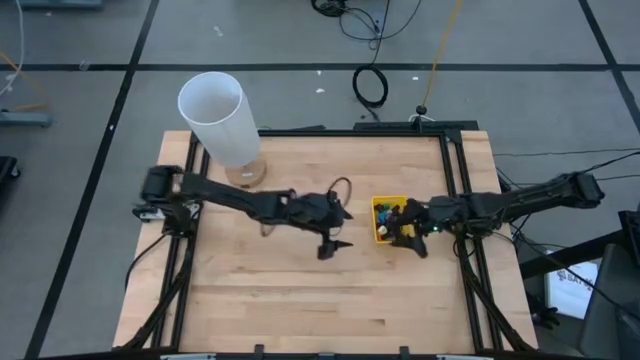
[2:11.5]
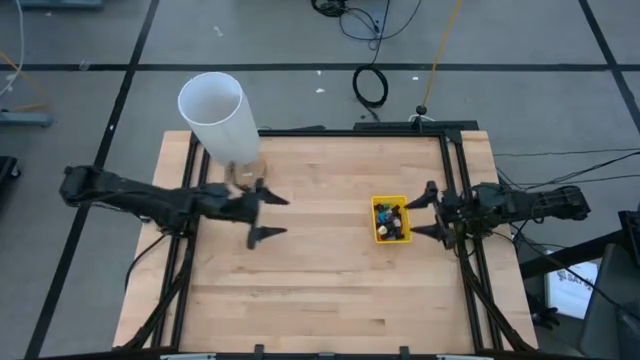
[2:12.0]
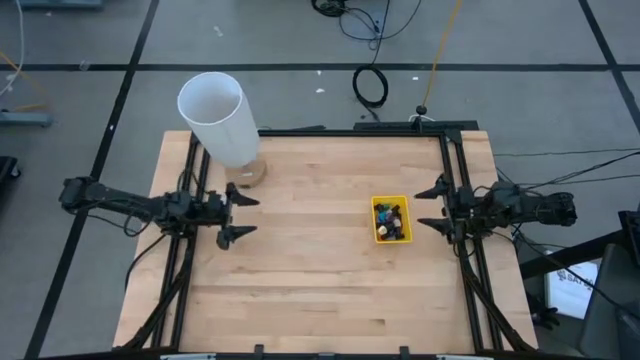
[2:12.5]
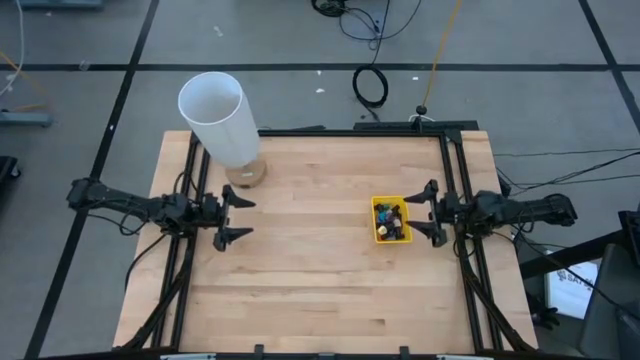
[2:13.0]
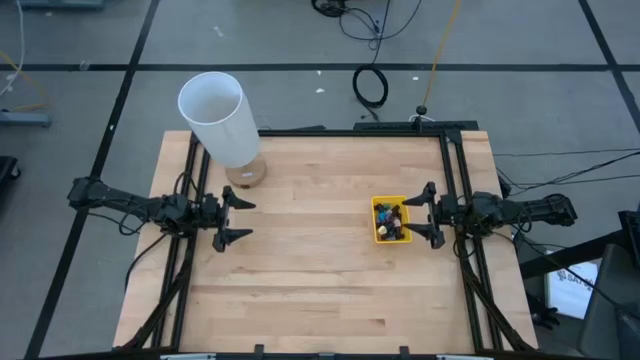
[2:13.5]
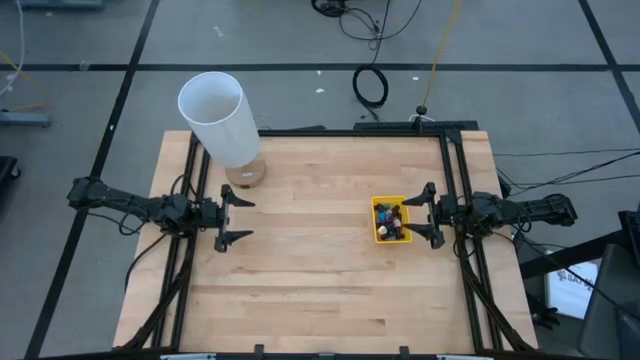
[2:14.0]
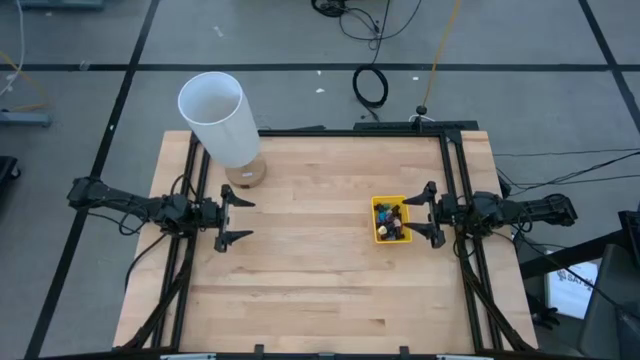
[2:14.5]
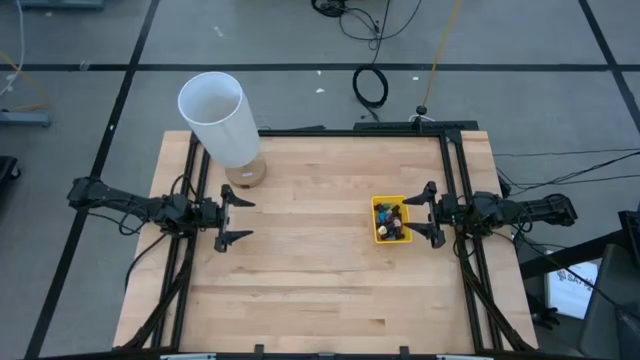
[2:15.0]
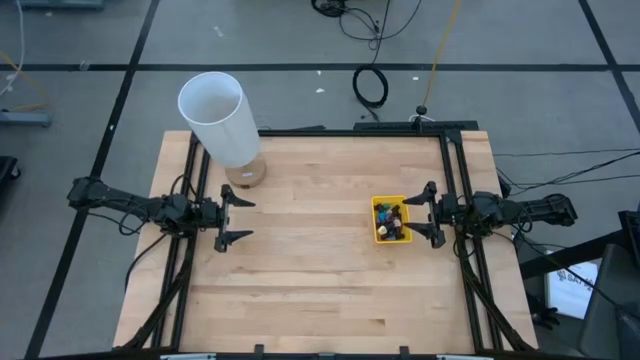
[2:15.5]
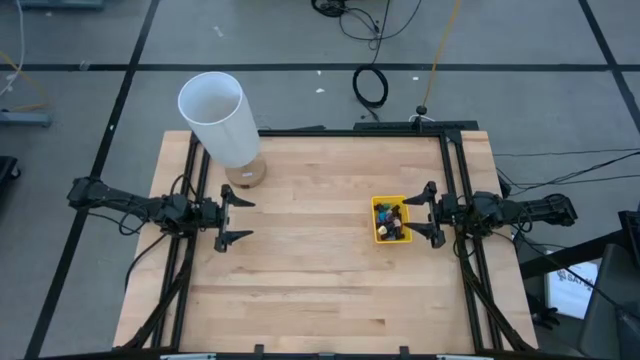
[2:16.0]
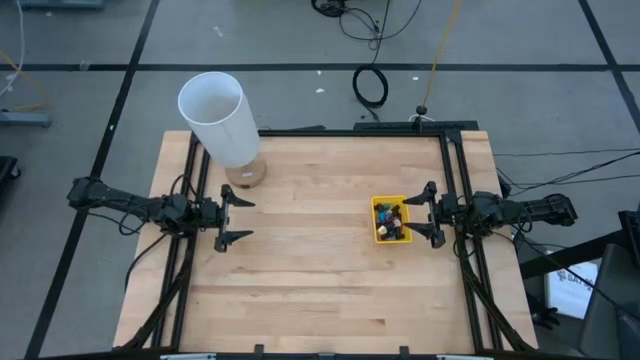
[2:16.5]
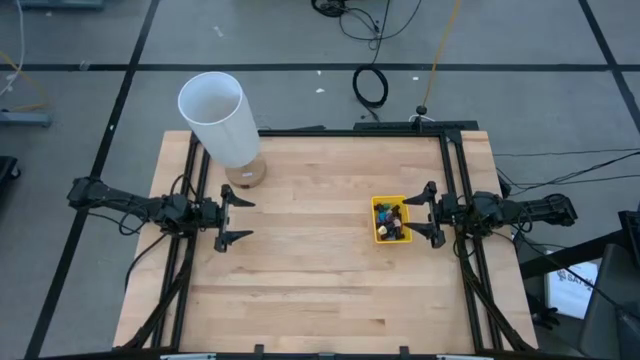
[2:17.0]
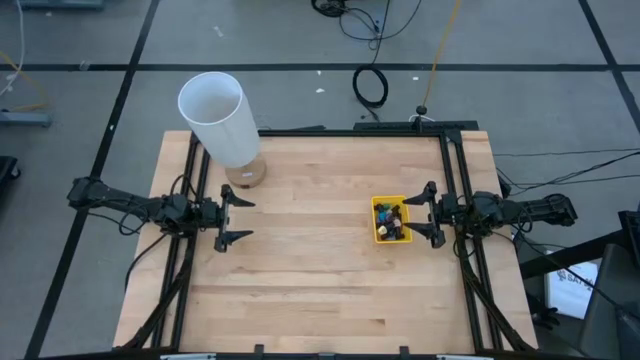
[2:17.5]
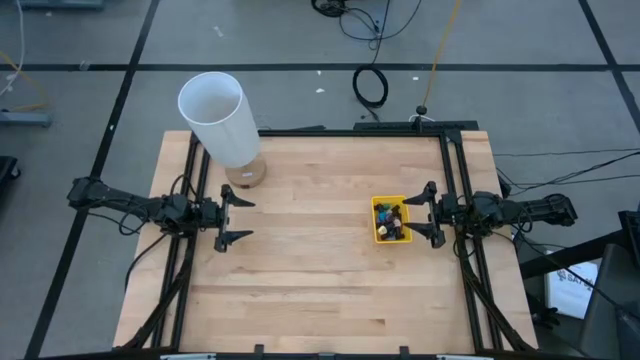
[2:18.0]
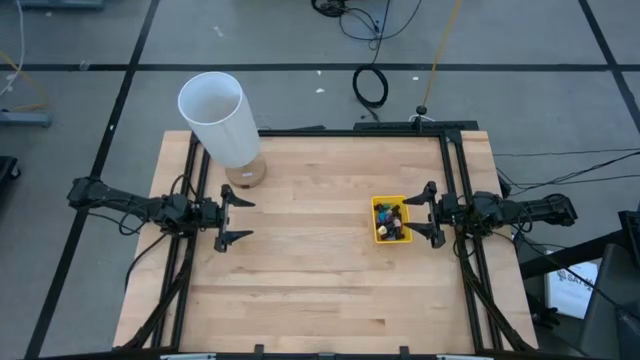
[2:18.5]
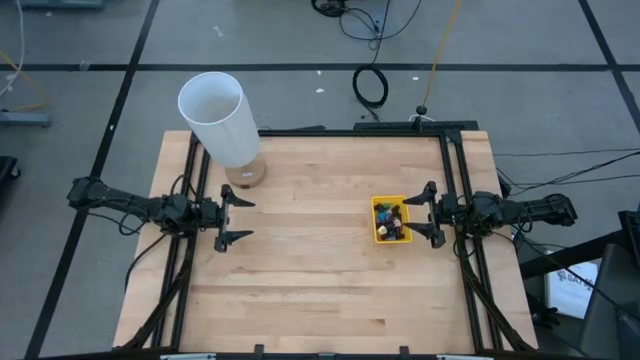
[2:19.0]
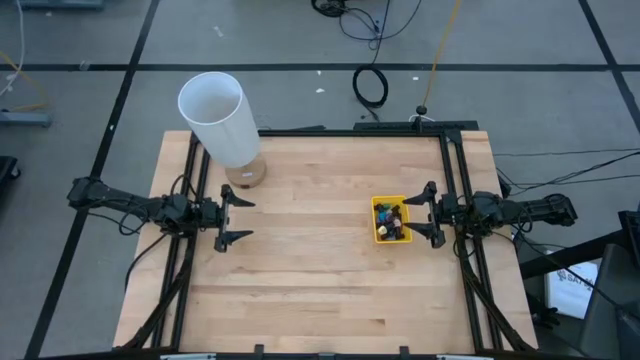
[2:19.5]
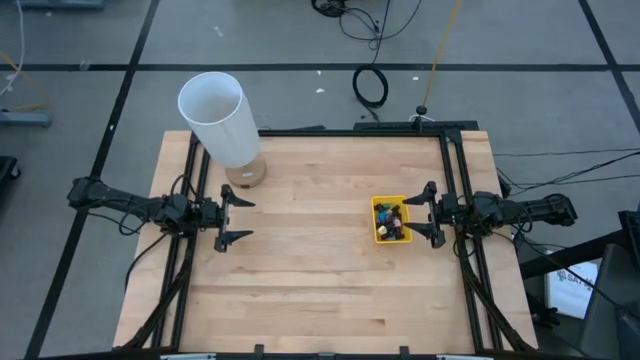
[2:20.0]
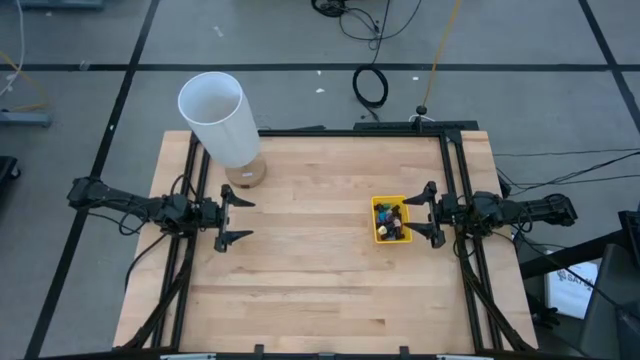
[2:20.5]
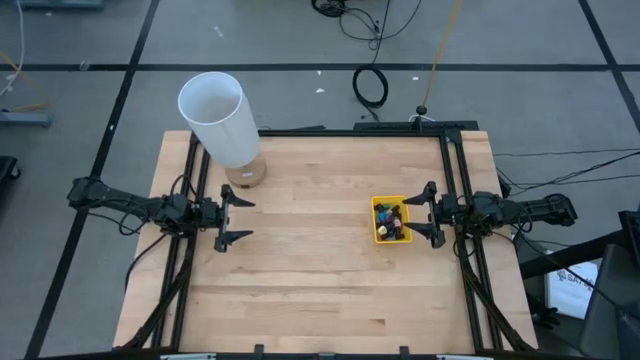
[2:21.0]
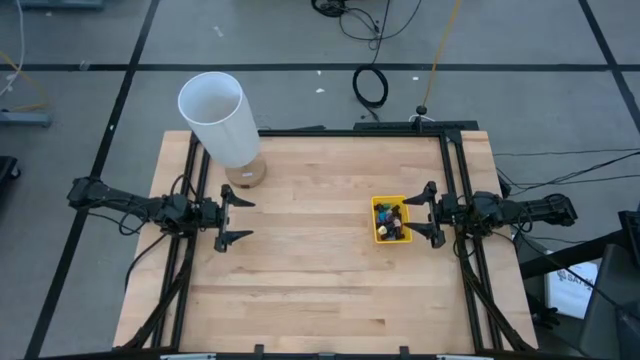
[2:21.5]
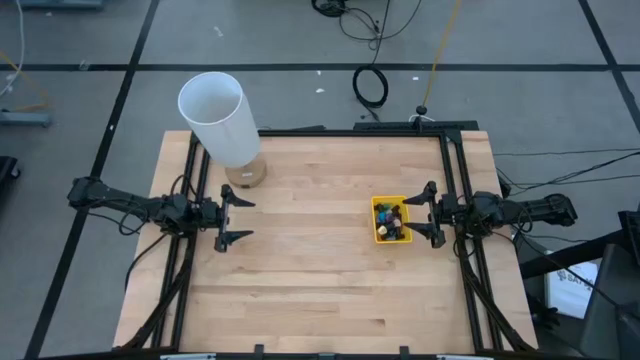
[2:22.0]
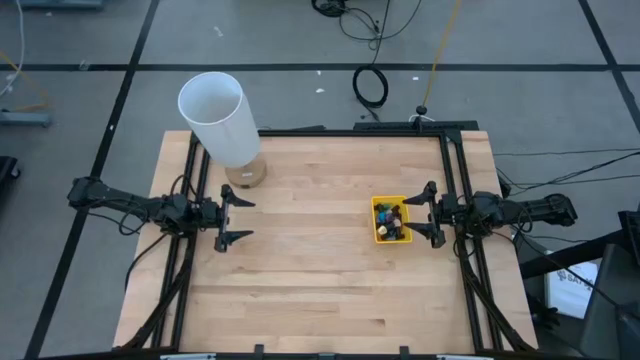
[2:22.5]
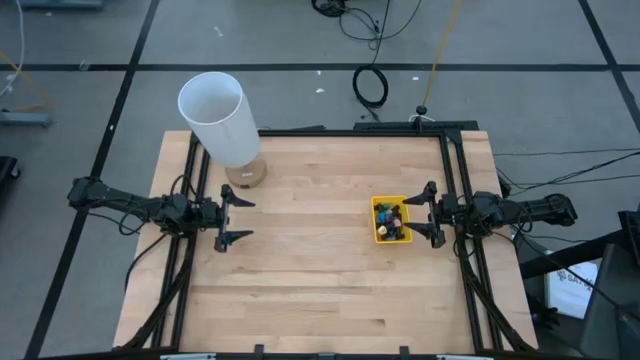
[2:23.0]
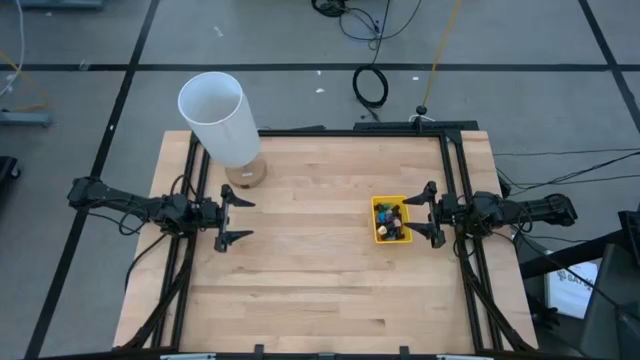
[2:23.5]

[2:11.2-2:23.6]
Task: Pick & Place Nail Polish
Return to Home Position

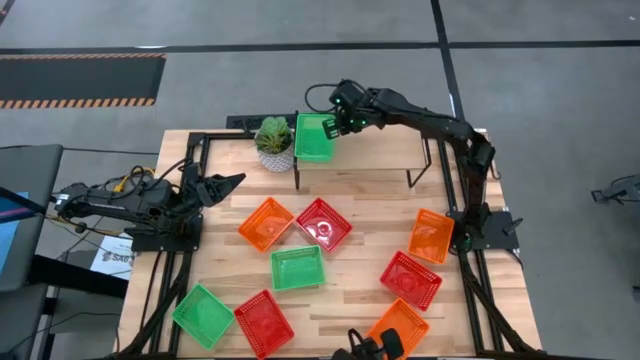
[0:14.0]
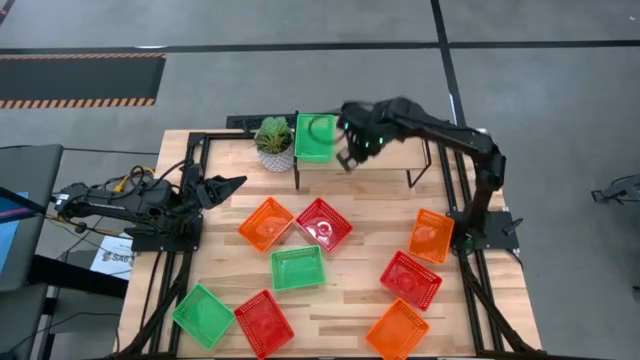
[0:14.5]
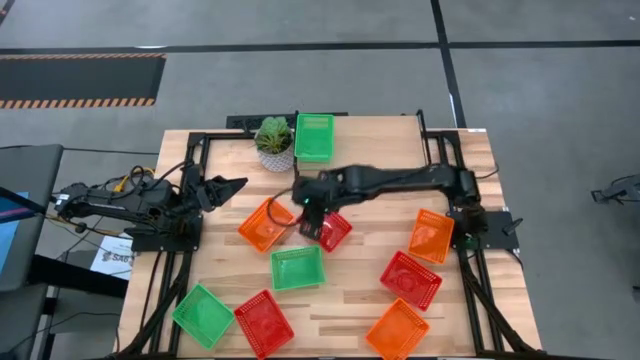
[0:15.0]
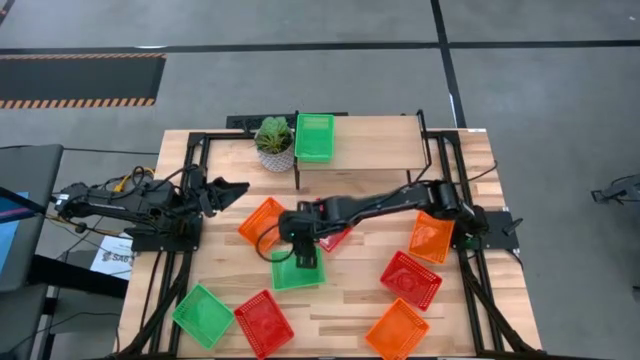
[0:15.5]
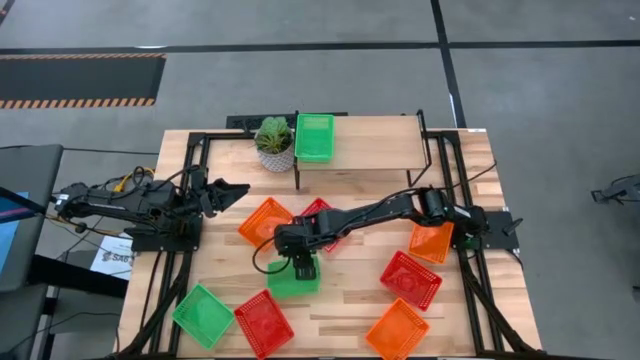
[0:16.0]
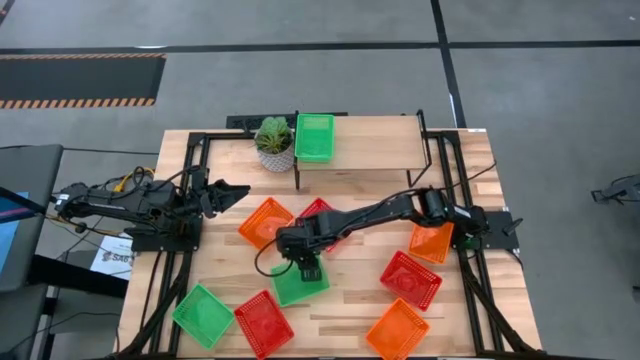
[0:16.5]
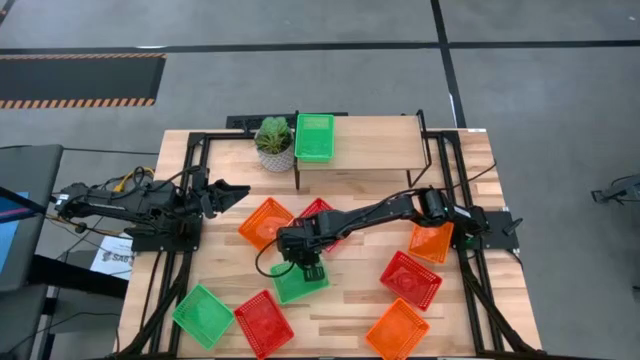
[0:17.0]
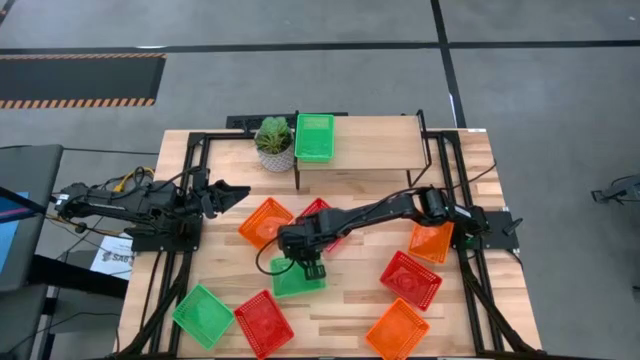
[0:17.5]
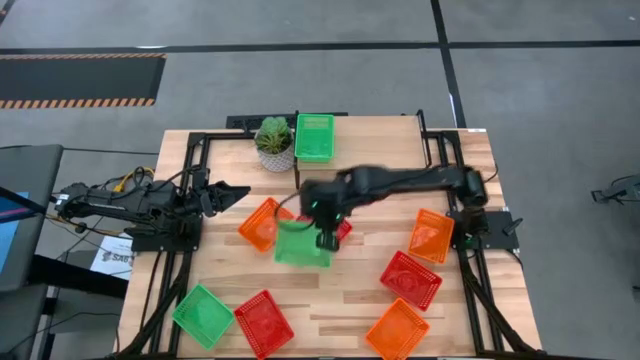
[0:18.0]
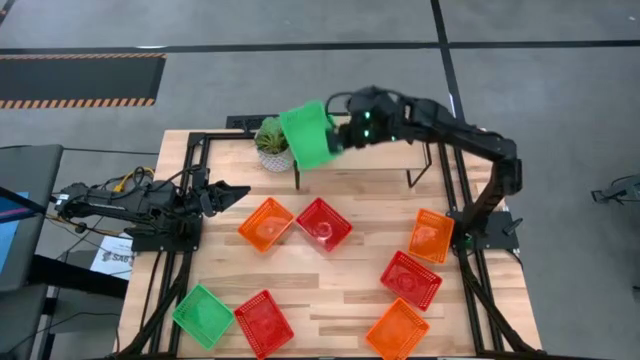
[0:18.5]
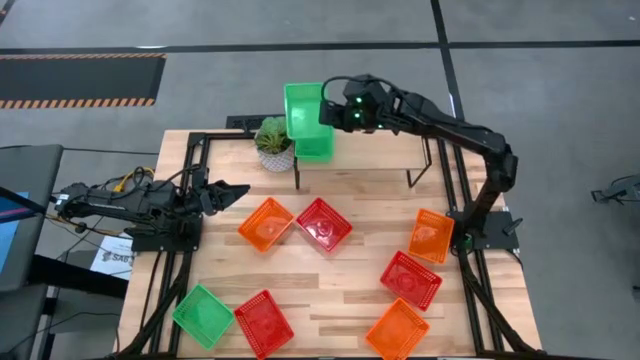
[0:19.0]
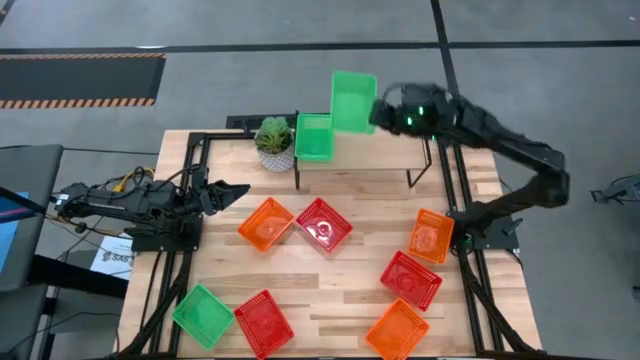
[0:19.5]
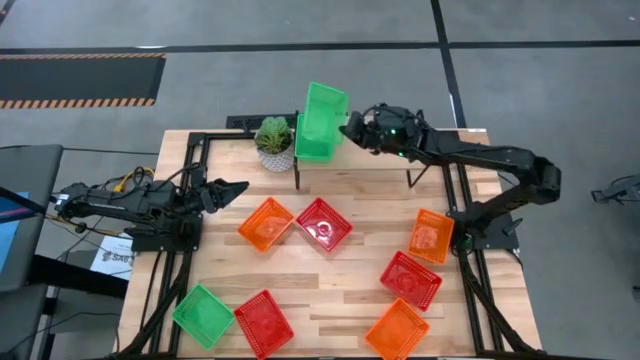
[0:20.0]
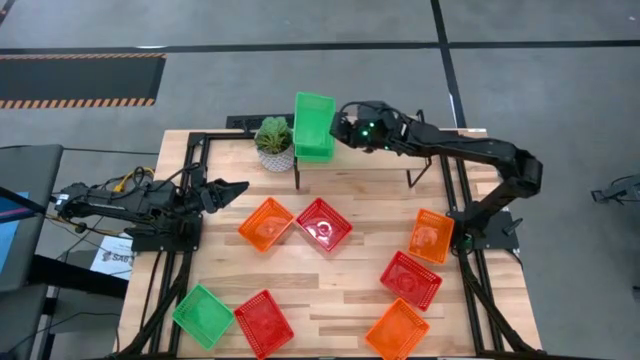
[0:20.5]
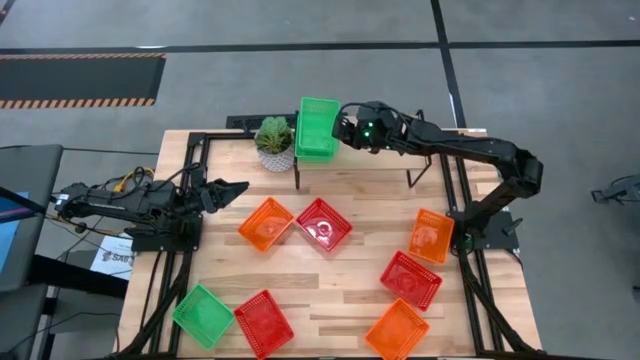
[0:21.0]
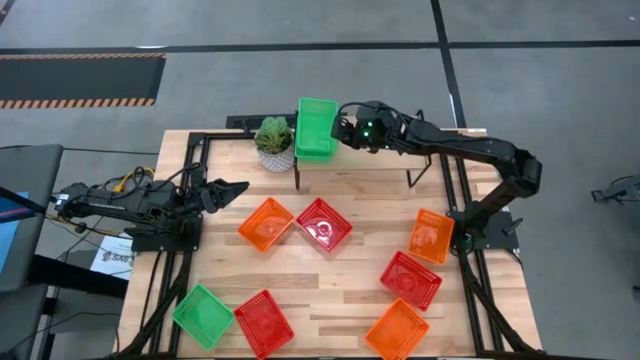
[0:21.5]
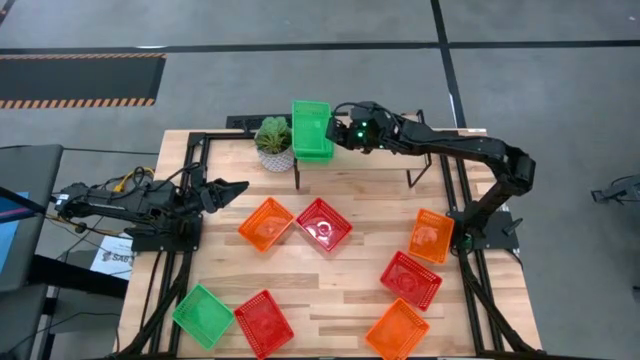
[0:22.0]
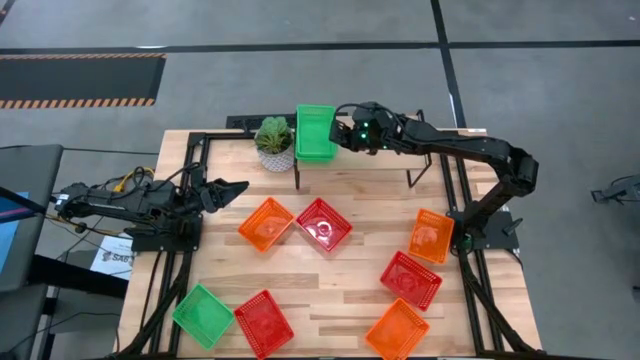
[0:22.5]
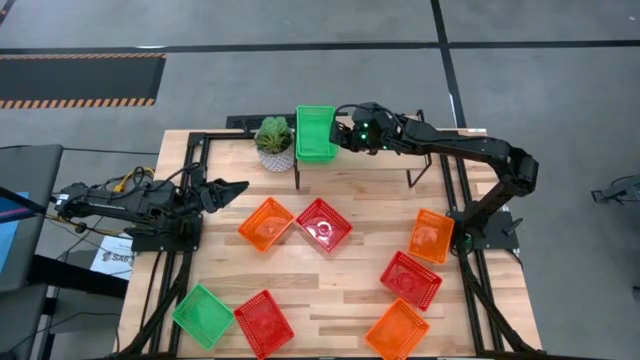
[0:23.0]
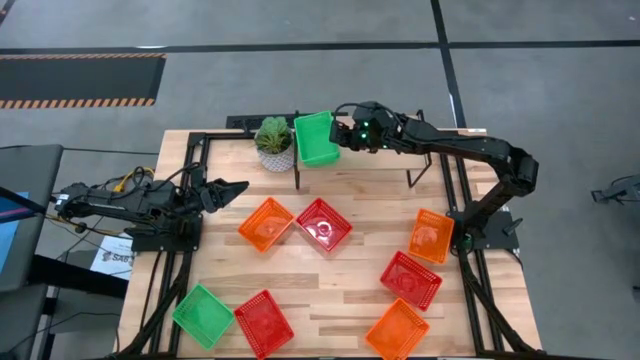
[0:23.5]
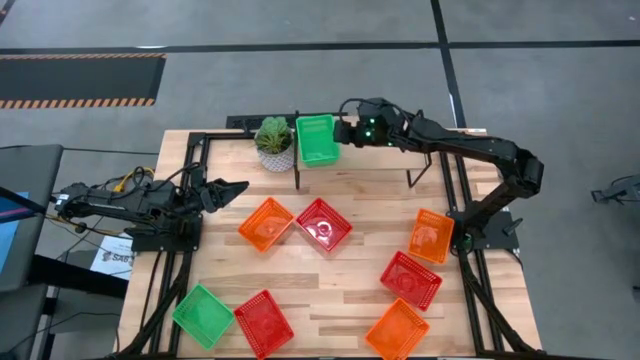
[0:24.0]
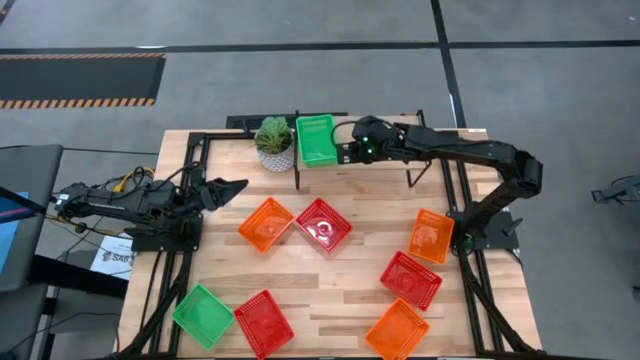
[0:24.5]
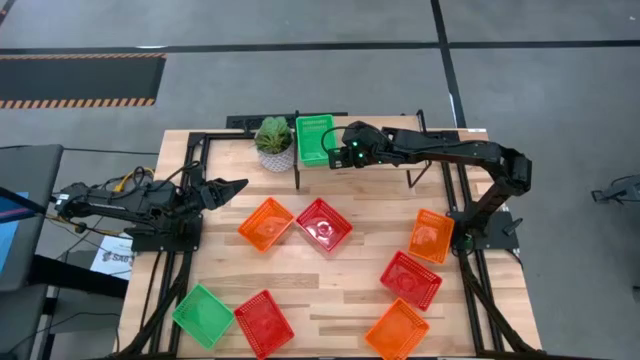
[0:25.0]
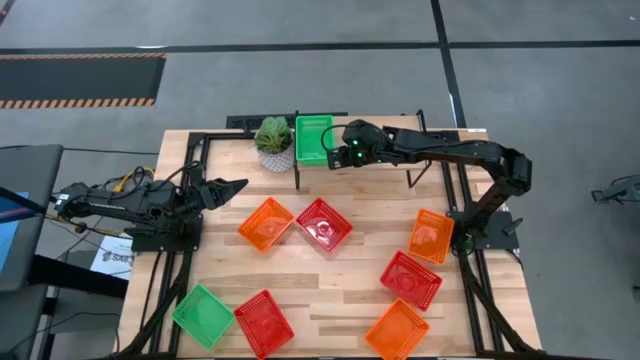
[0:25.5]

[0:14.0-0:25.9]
Task: Stack baskets on shelf by color
Stack the top green bin on top of the green bin on the shelf
